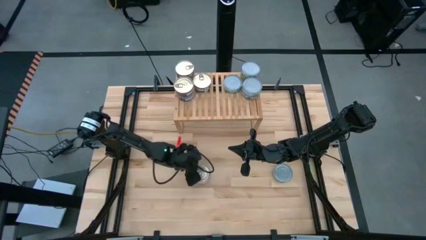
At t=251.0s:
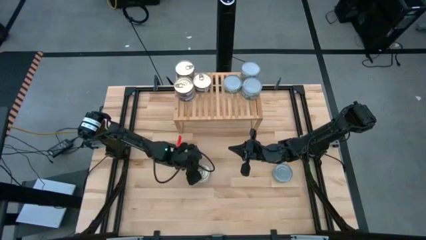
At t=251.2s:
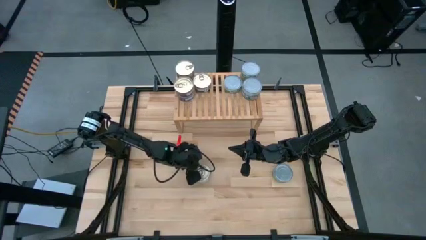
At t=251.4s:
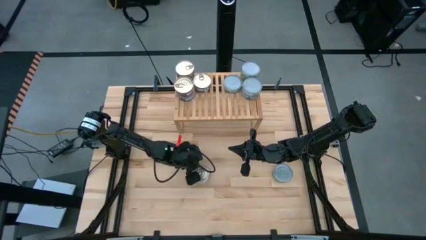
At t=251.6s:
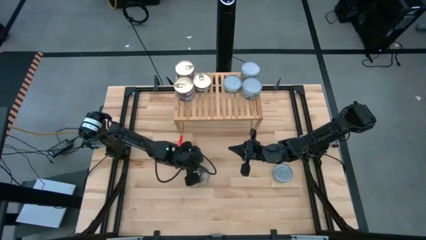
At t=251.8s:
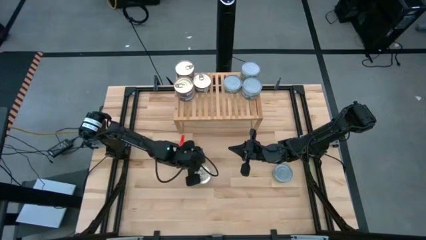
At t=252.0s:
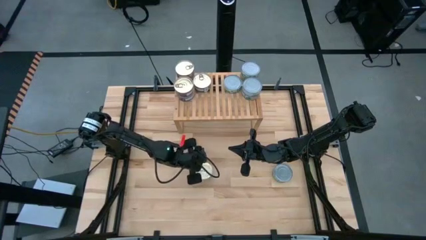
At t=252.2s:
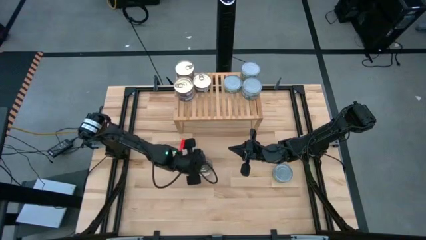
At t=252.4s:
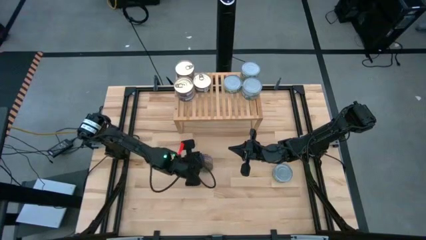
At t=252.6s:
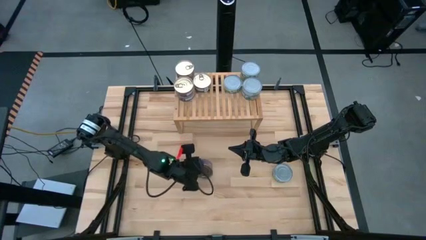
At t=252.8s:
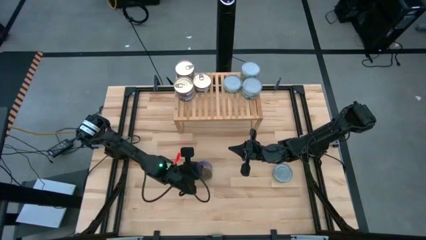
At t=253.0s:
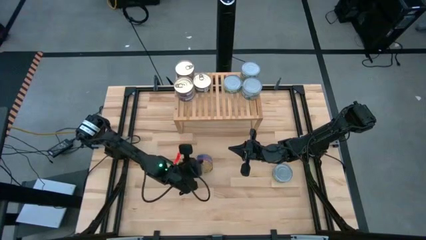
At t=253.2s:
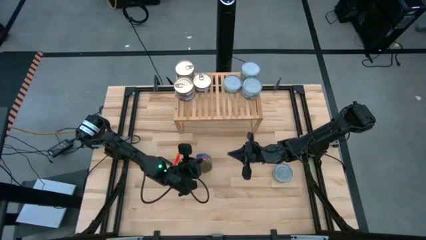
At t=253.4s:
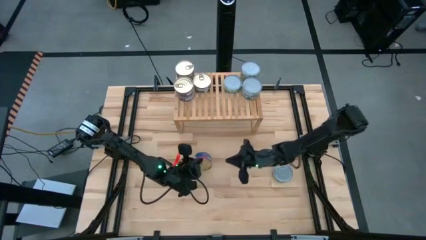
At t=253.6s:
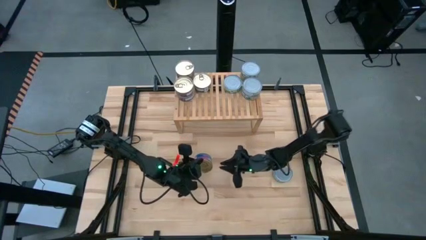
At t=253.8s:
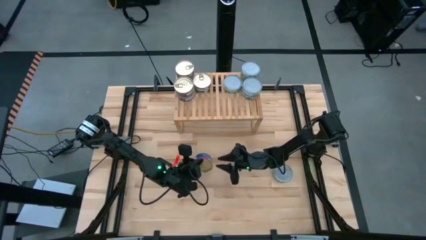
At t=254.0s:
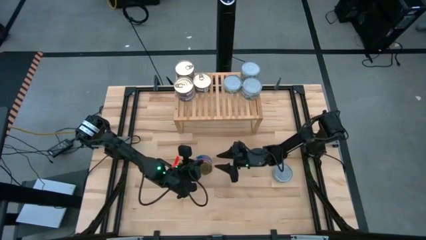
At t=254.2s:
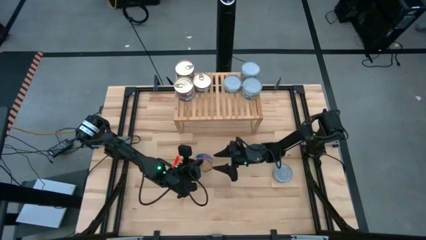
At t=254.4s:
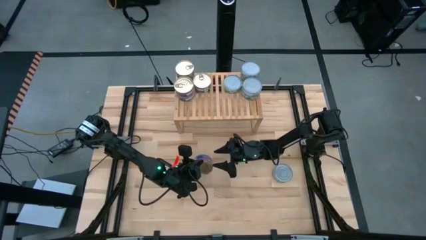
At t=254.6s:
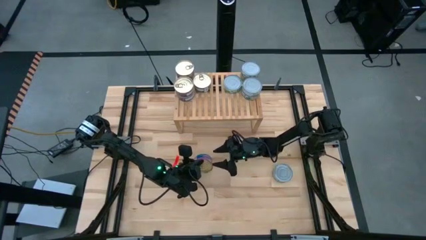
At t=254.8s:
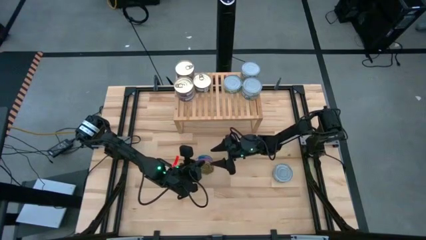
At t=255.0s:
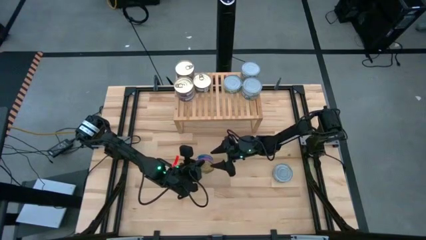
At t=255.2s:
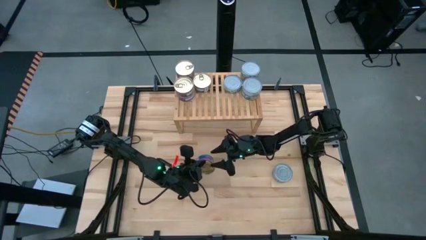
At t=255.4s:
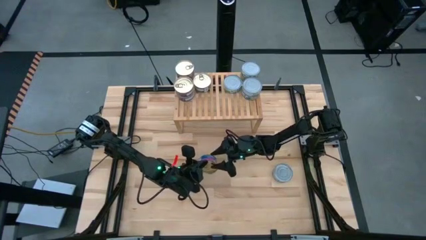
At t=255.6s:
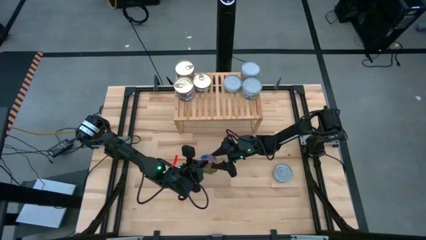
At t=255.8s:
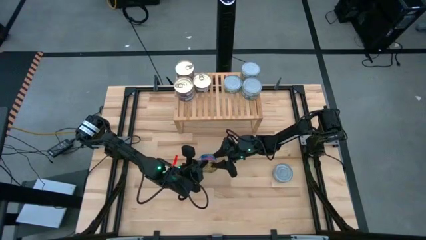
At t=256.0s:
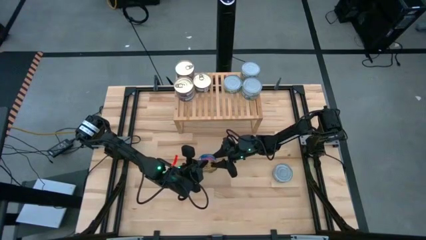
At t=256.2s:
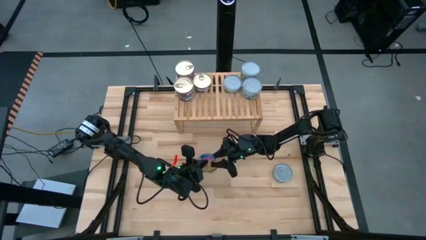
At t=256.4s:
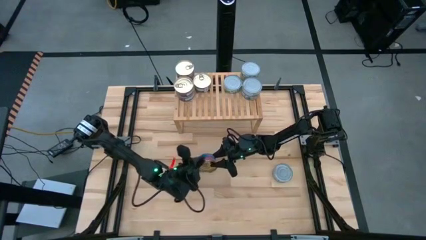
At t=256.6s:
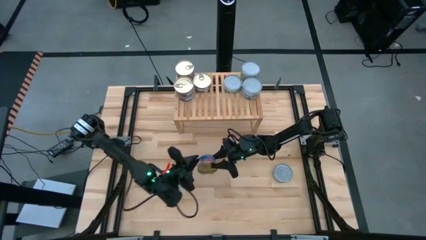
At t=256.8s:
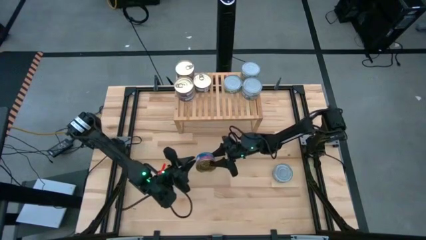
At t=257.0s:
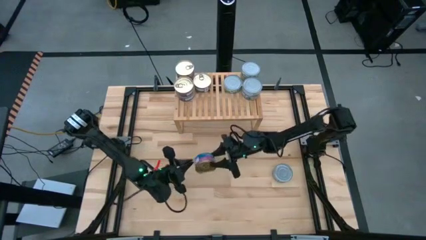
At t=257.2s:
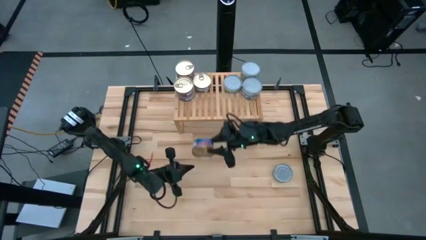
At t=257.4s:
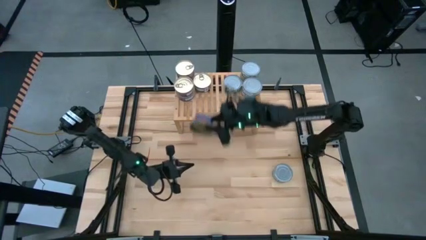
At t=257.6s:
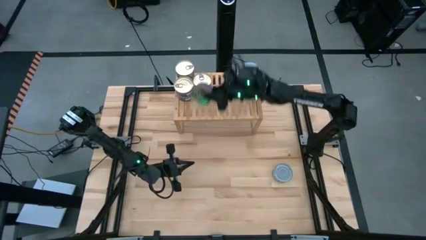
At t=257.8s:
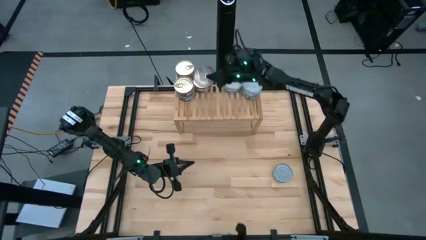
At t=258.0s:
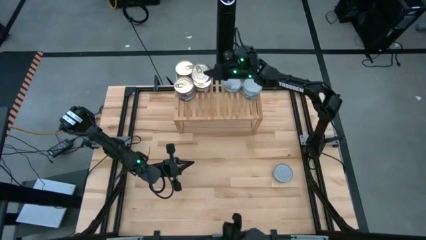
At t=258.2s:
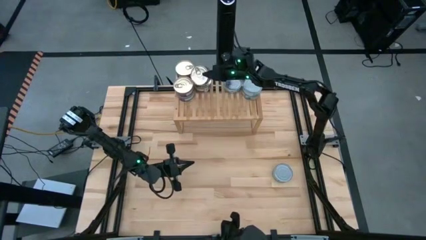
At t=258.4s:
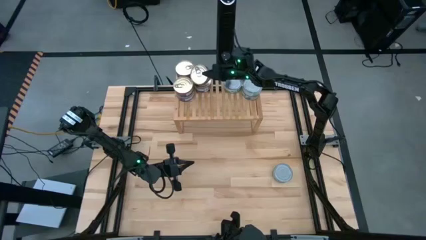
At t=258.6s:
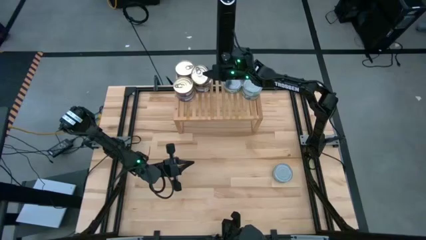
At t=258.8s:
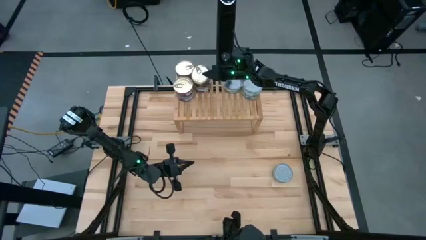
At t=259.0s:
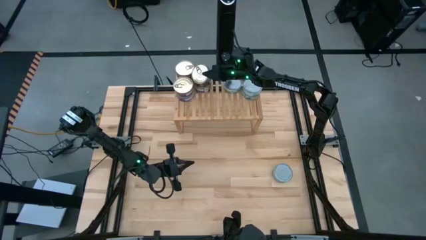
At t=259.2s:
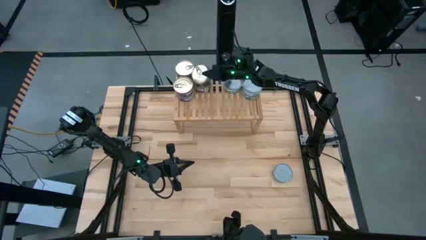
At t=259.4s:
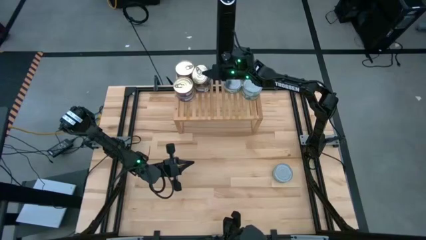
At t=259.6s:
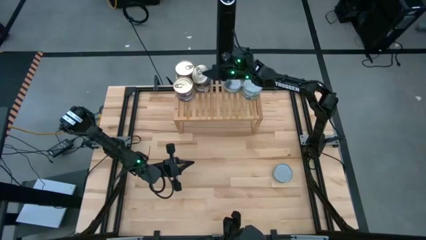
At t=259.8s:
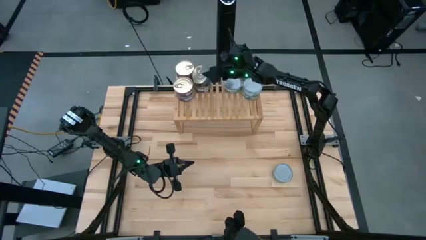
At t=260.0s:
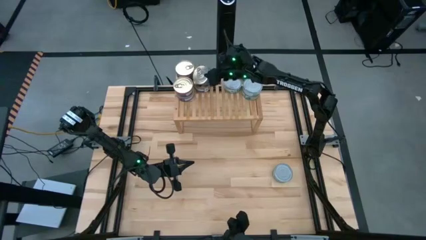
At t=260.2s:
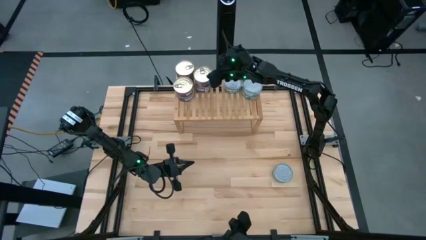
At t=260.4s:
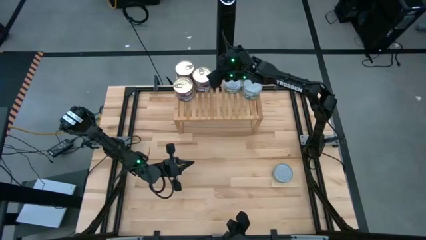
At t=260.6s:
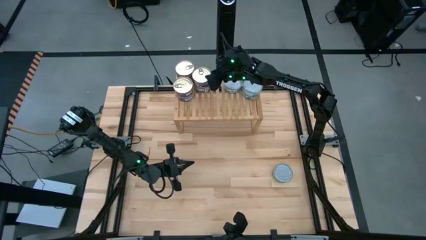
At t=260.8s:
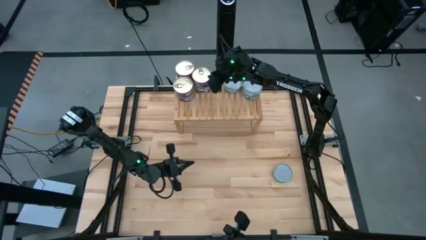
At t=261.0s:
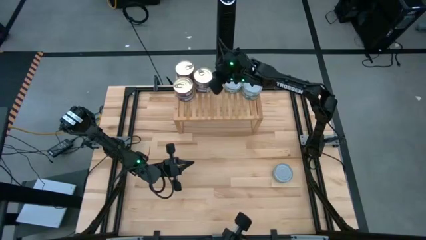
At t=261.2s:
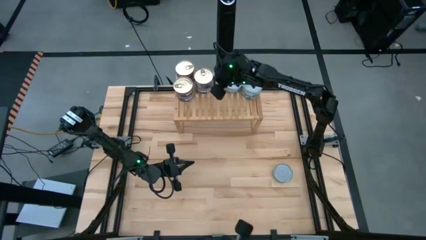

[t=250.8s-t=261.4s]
Task: Stack canned seafood by type on shelf
Stack the blue-pink tuna can on top of the other blue tuna can on the shelf

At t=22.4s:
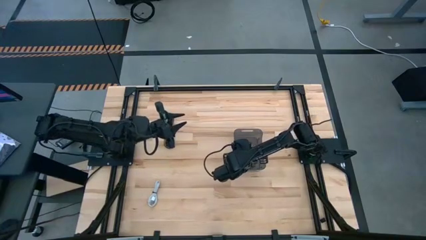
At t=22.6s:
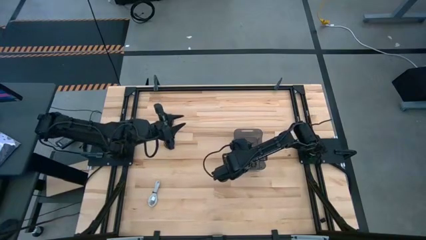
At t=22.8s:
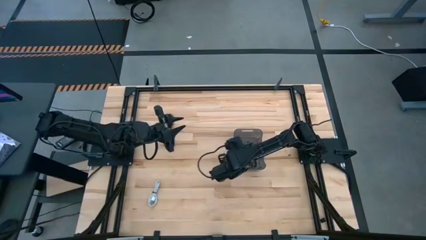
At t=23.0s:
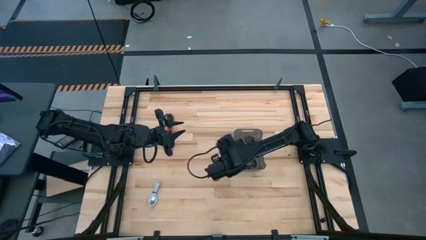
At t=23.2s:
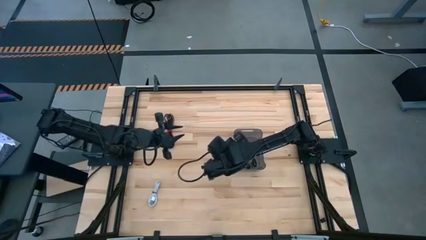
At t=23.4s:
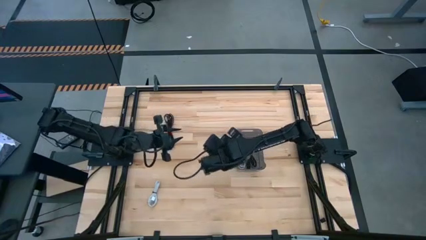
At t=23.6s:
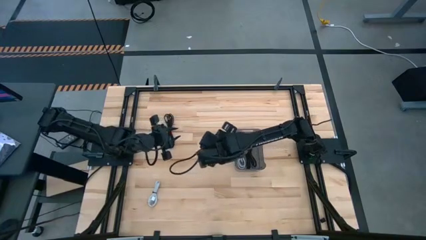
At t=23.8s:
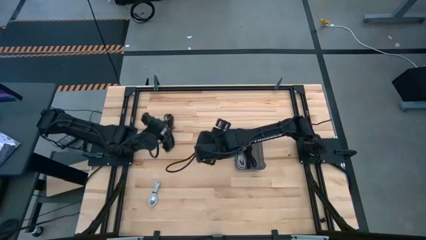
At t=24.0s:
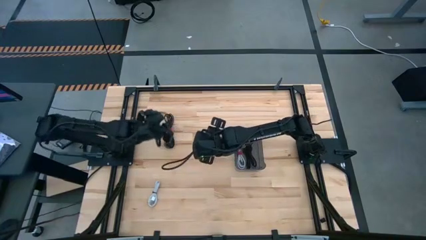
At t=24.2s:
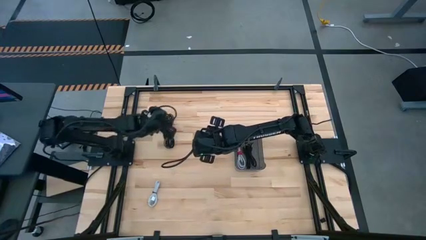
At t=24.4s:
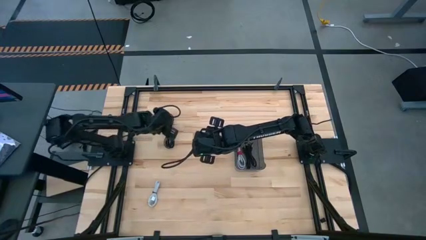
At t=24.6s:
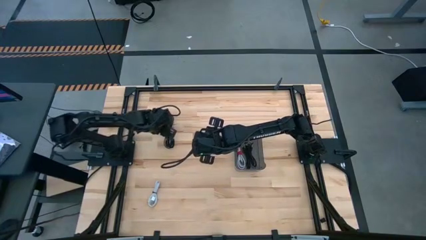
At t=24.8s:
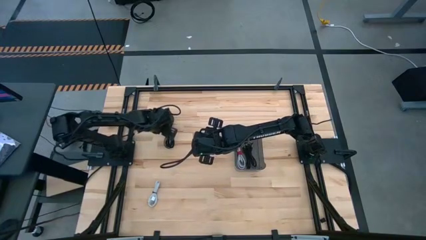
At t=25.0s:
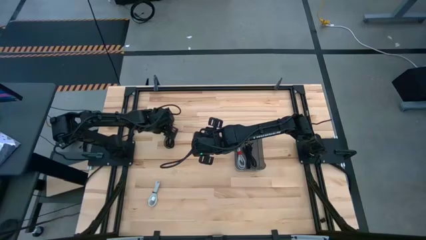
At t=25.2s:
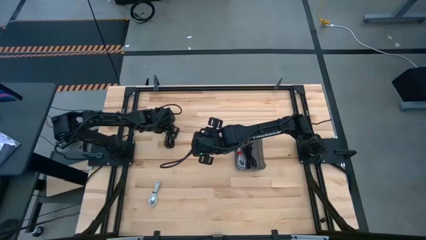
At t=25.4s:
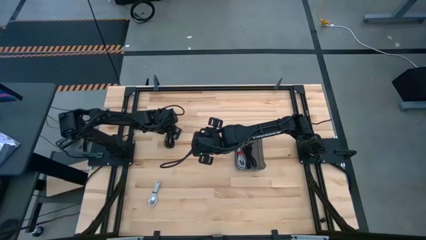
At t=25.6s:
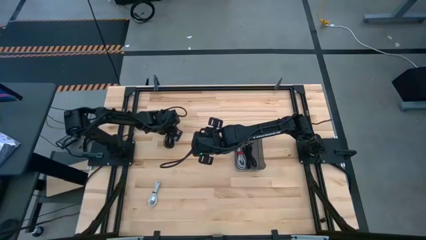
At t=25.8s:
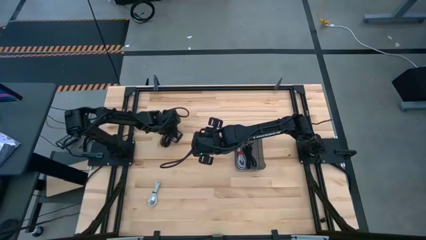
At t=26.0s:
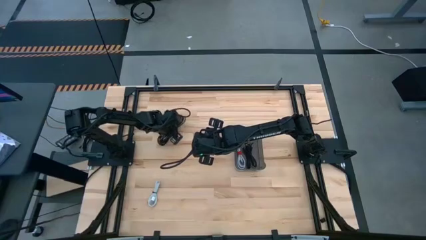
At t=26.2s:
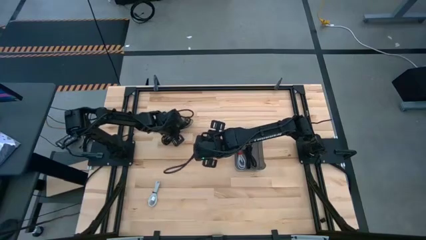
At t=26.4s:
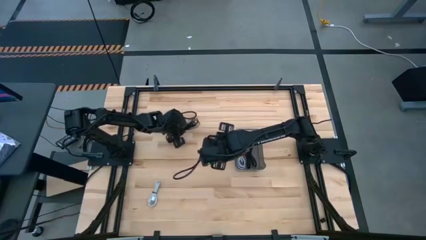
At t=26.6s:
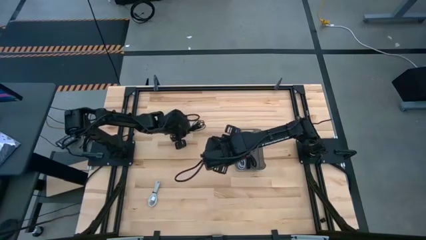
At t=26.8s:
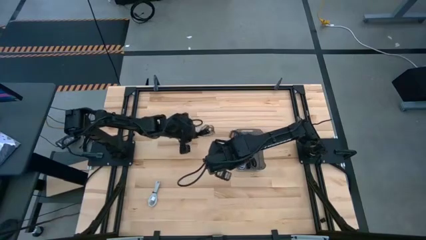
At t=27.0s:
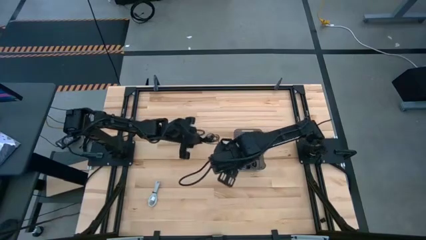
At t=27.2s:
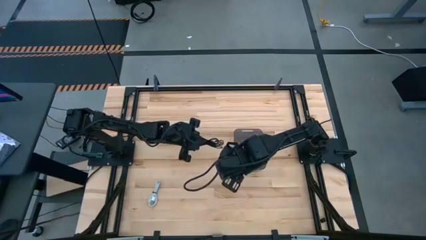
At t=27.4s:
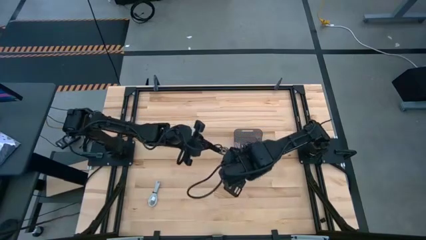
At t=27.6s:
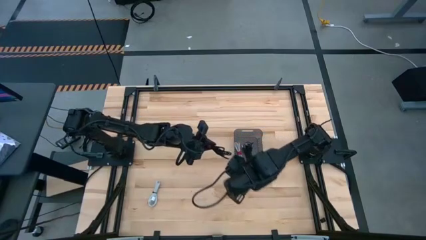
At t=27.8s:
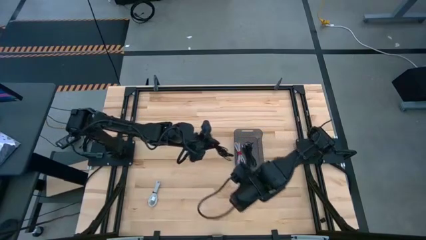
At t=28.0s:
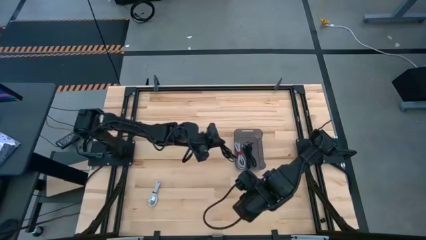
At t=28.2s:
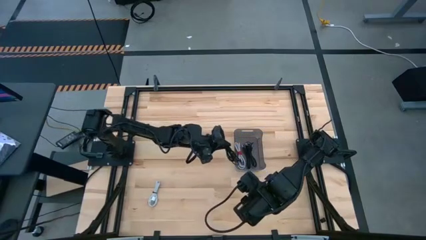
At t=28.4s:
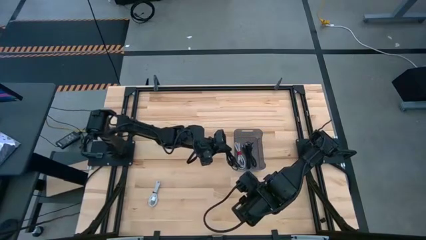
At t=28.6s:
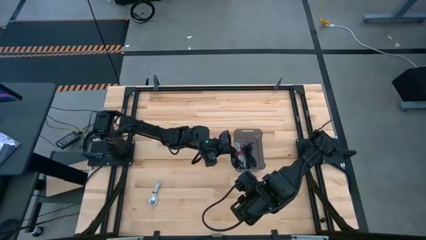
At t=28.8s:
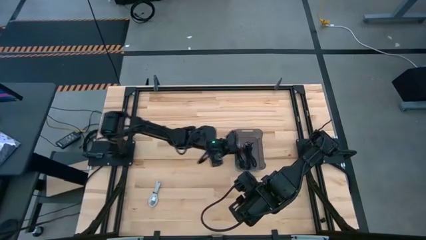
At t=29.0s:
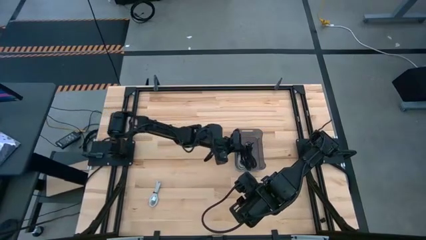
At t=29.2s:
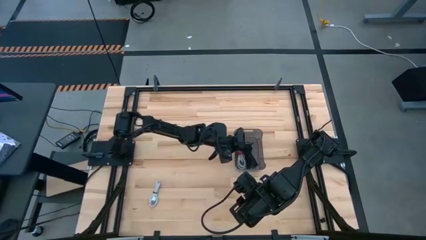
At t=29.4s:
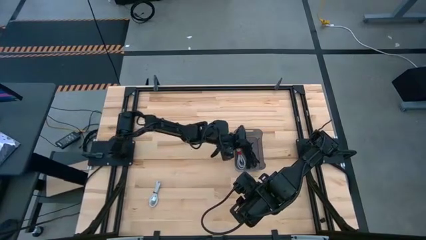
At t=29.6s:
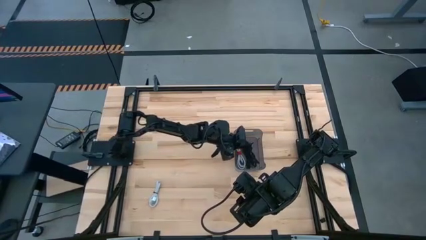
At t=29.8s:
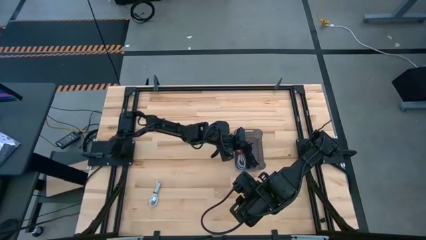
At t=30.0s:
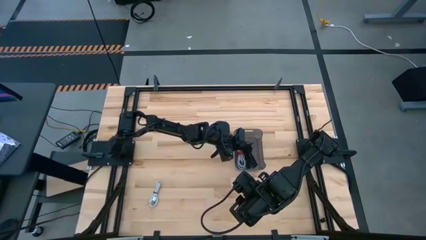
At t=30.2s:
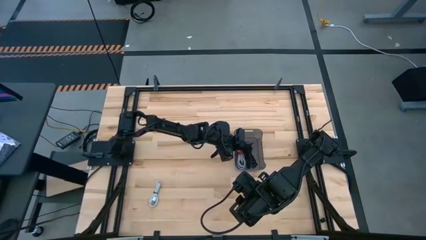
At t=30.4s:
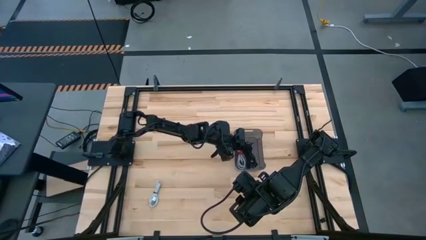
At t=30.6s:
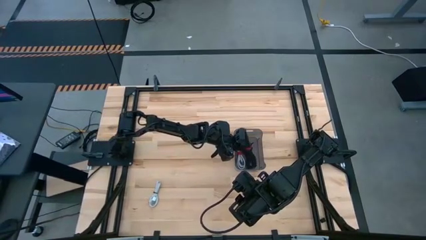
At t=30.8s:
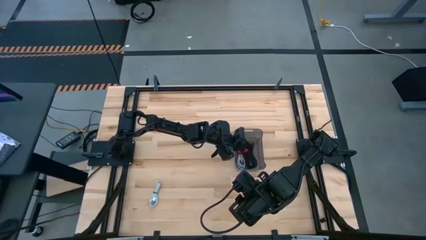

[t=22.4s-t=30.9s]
Task: Pick and place USB-C Cables
Put the black charger cable into the black bin
